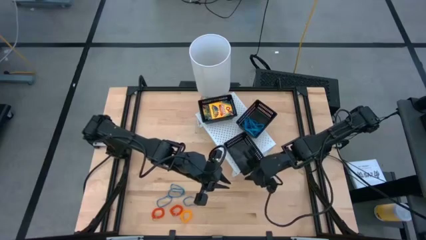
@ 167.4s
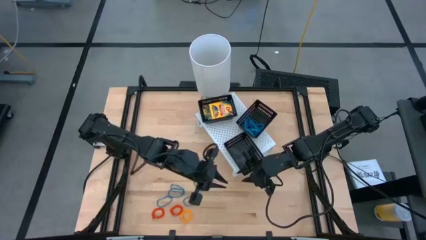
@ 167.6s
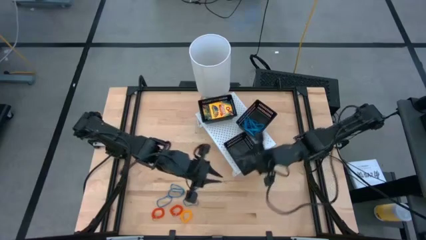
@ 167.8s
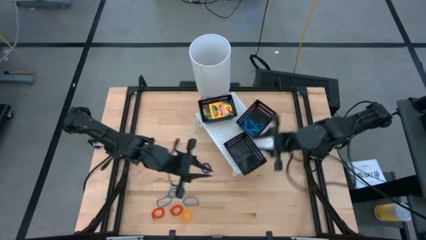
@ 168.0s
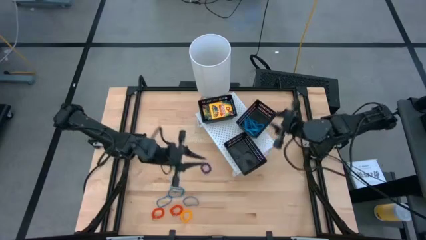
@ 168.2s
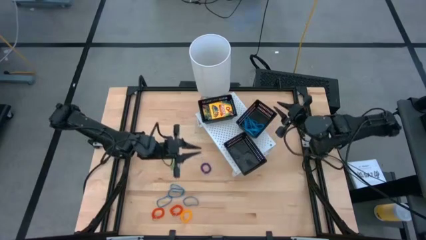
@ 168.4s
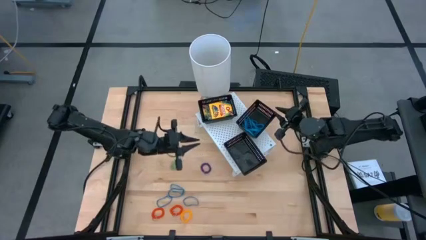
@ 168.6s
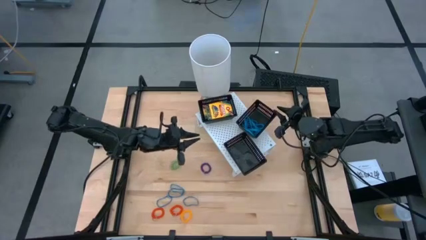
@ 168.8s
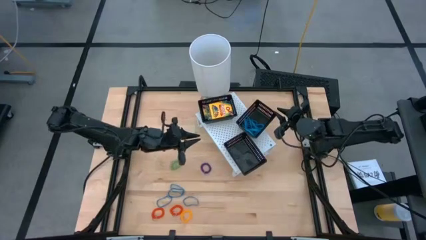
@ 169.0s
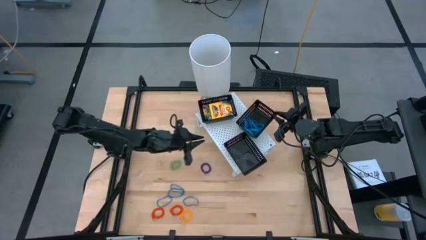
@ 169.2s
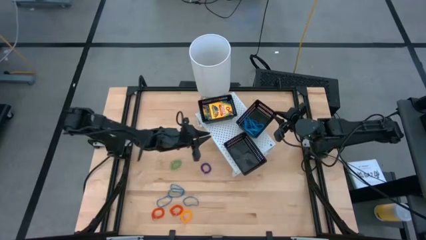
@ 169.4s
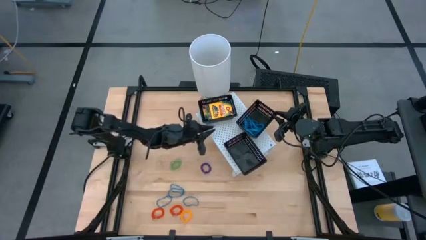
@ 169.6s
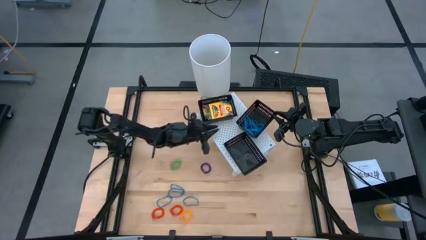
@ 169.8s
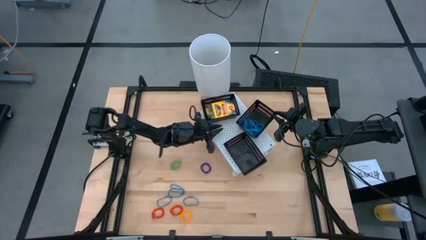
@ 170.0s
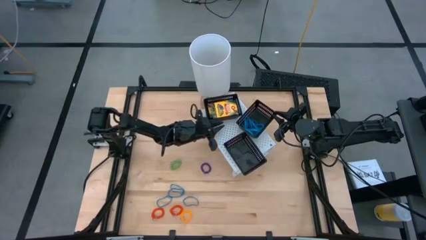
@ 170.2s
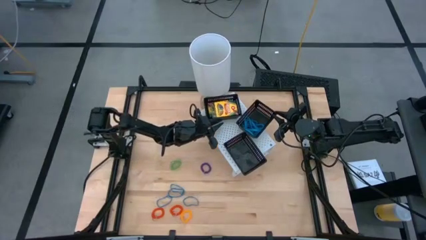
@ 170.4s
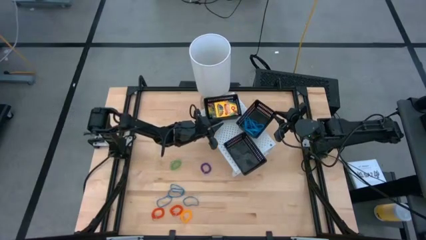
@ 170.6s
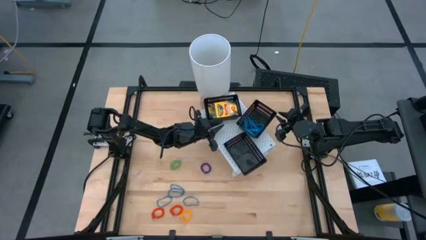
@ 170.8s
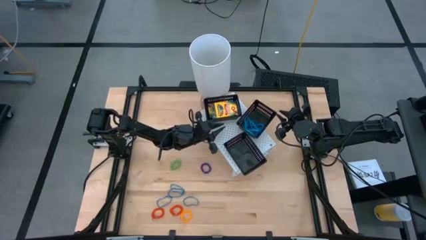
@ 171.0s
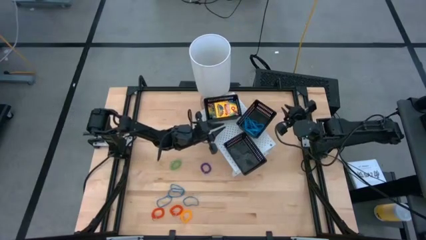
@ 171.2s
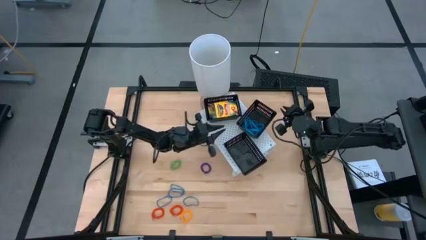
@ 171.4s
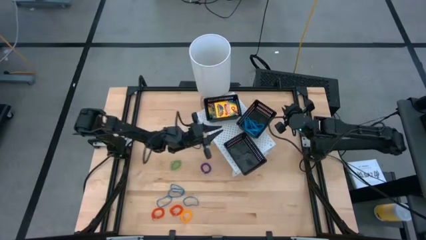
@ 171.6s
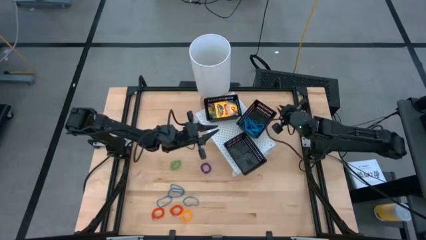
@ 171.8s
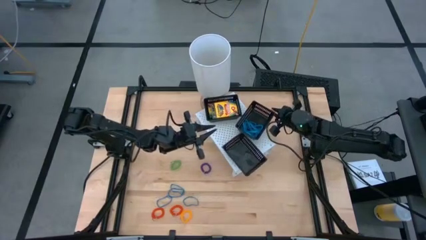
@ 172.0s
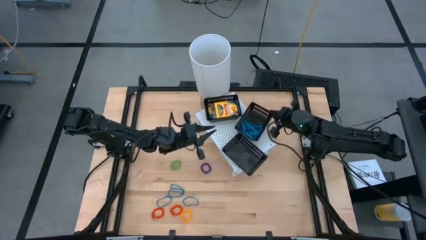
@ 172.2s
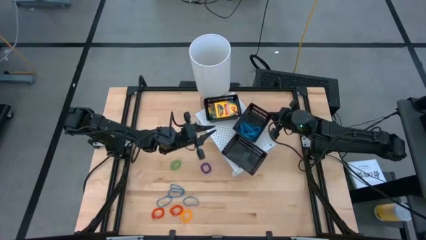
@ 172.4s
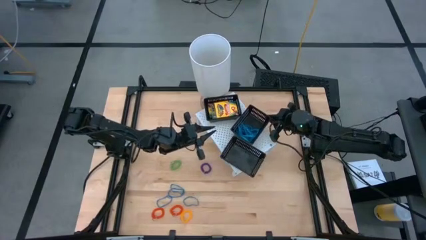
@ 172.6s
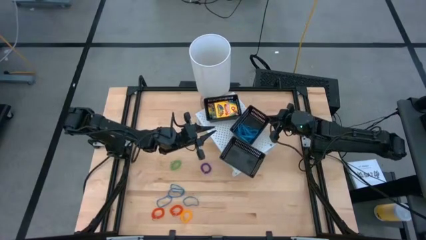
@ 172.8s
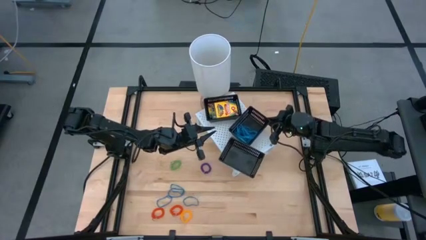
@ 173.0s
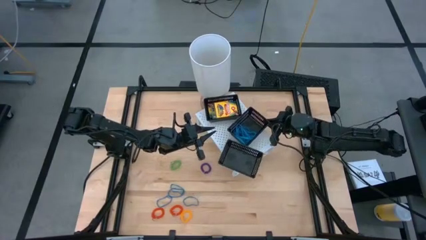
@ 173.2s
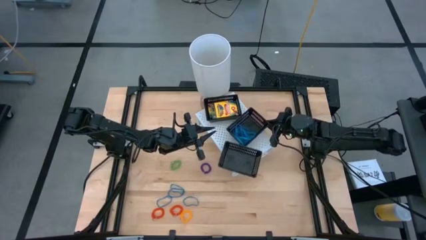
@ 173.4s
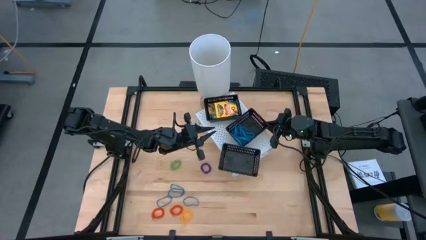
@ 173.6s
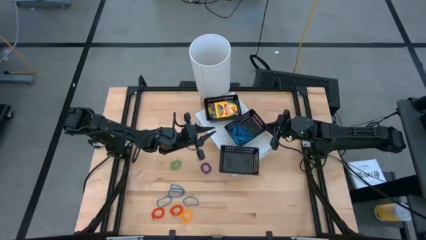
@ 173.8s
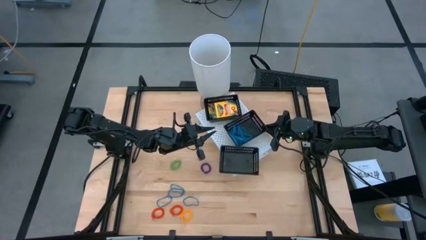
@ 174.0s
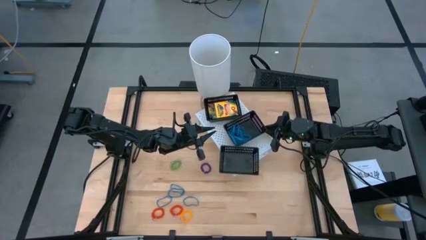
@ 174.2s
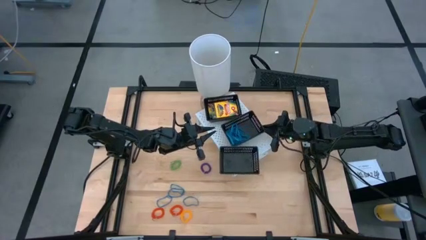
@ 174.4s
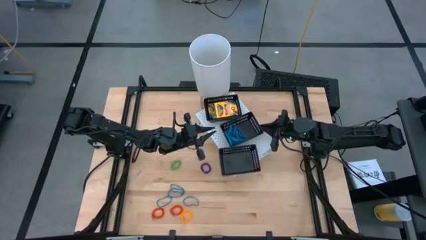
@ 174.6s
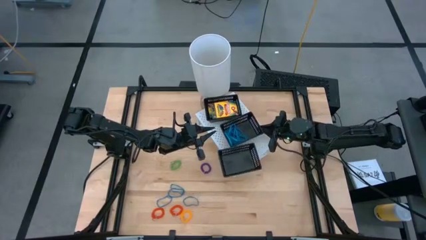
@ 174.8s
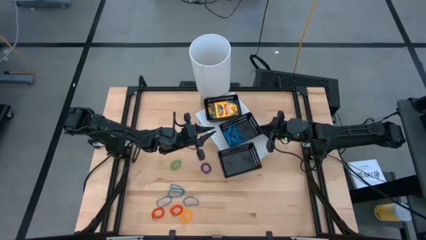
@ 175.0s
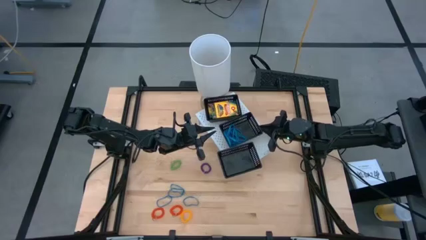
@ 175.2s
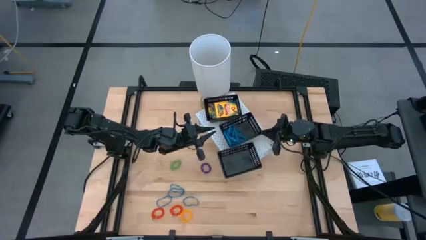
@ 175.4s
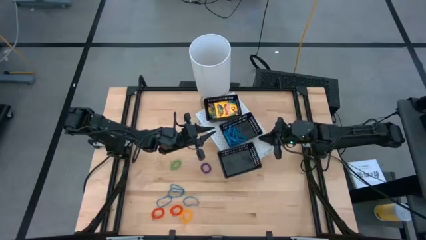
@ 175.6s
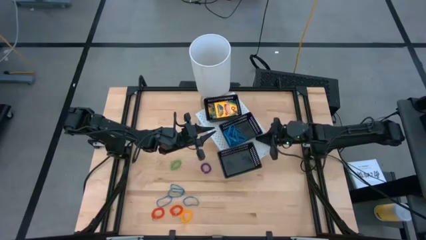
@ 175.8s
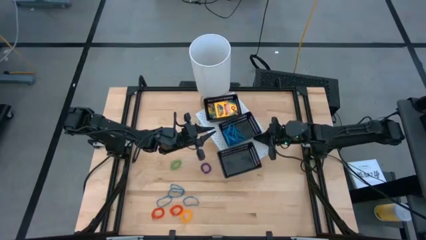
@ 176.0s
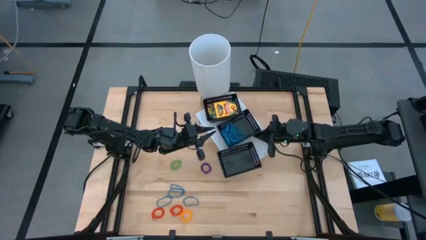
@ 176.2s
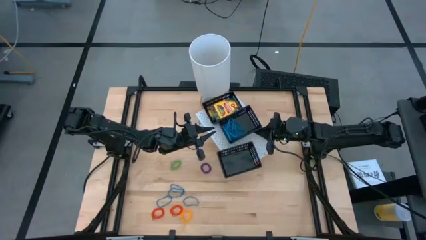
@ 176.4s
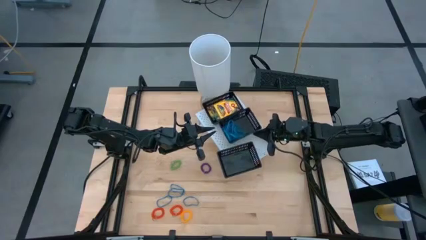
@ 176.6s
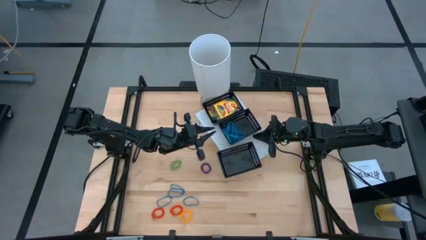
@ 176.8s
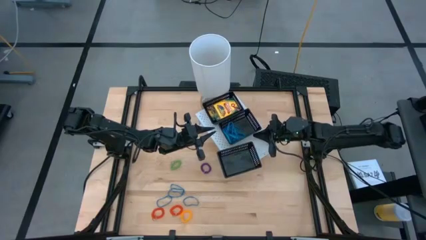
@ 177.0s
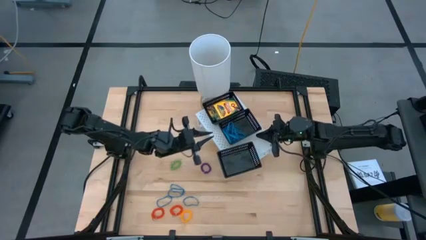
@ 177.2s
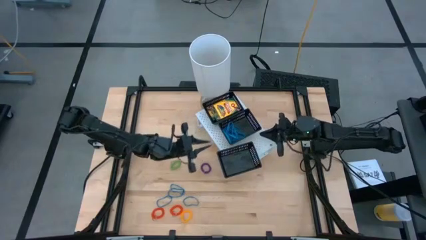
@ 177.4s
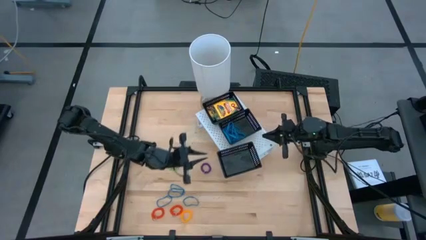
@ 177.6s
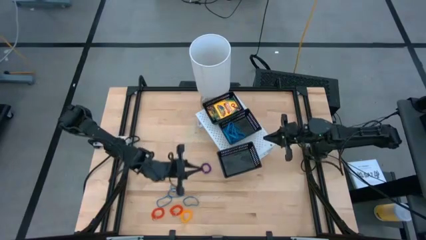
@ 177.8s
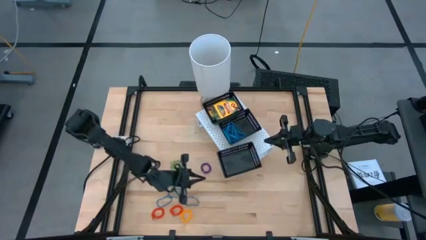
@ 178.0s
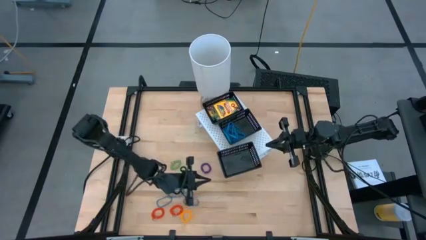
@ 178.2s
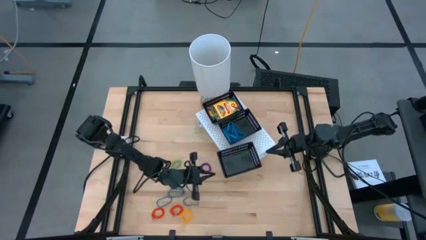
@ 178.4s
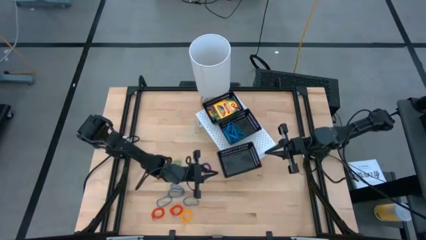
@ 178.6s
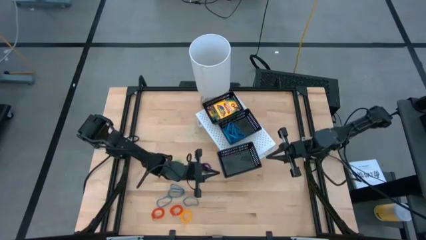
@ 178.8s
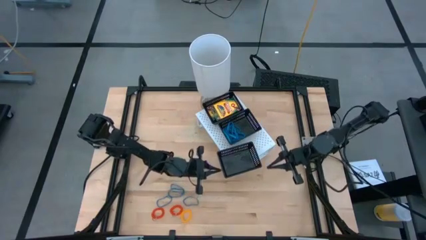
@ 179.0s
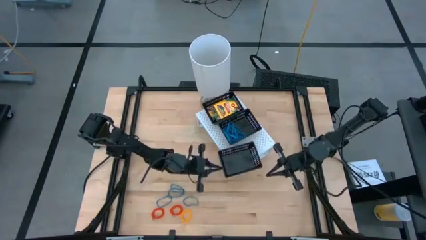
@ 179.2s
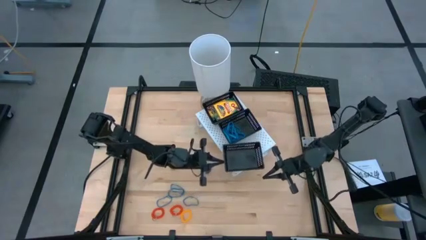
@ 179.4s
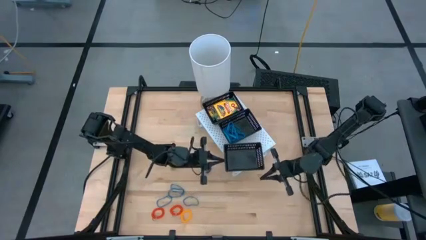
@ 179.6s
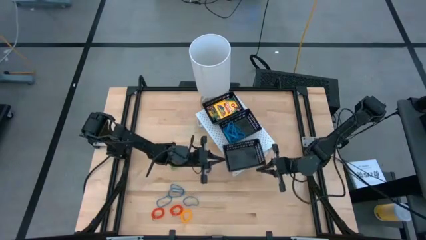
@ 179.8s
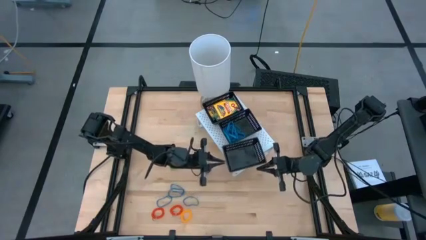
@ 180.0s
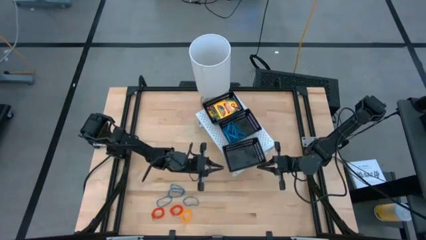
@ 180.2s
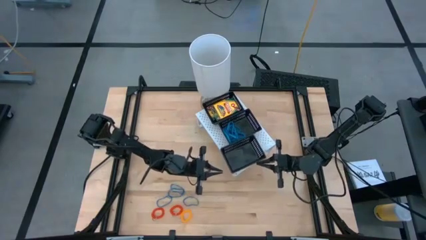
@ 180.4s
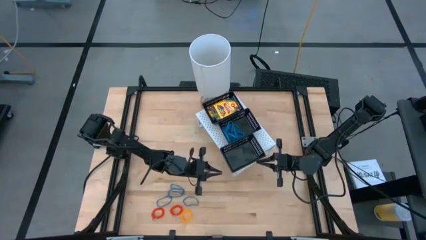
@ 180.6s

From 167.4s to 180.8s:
Task: Pick & Place Office Desk Supplies
Adjust the black bins on the shelf

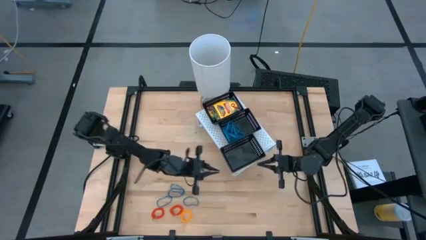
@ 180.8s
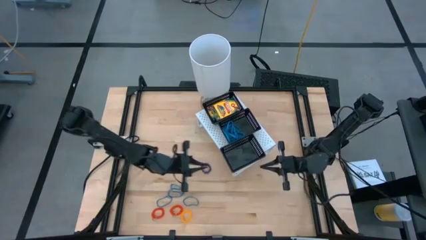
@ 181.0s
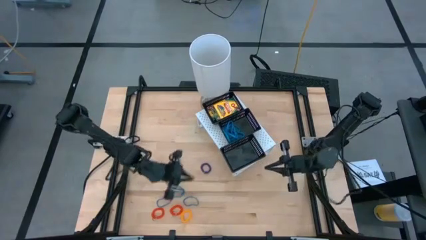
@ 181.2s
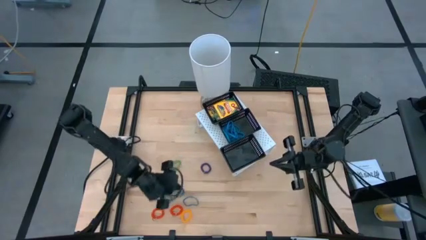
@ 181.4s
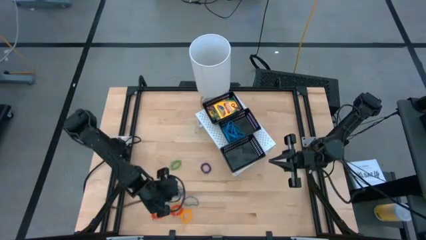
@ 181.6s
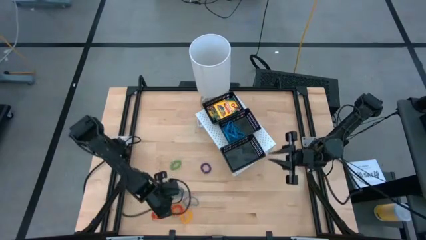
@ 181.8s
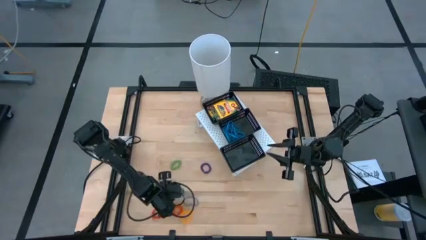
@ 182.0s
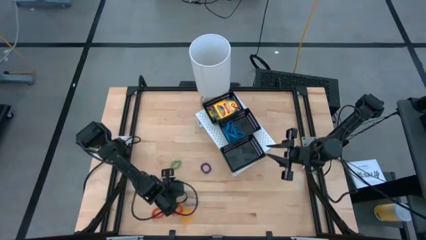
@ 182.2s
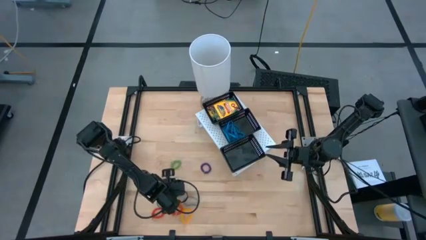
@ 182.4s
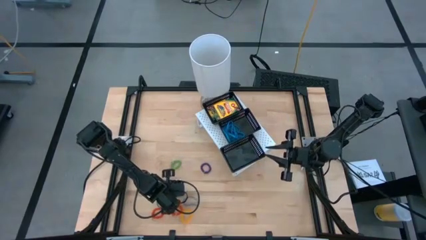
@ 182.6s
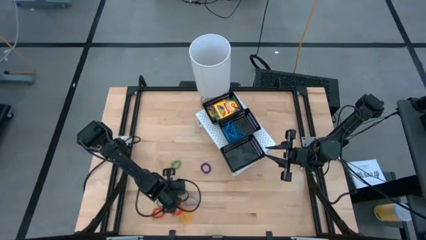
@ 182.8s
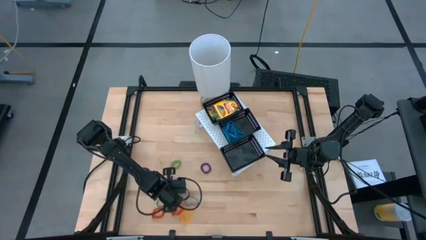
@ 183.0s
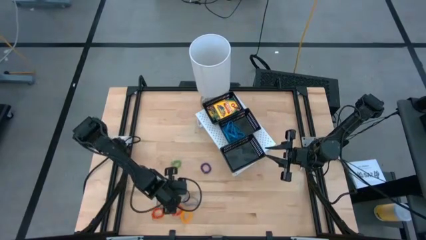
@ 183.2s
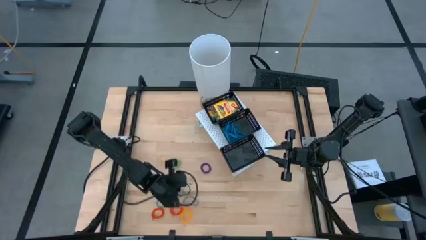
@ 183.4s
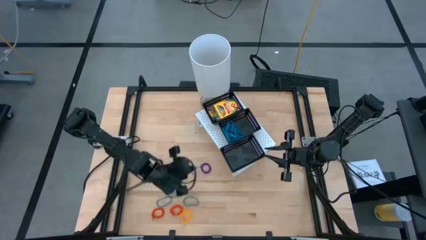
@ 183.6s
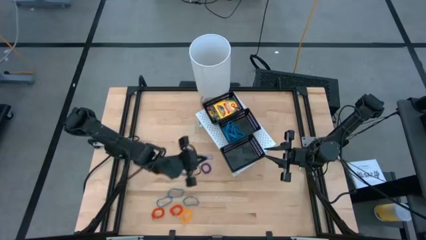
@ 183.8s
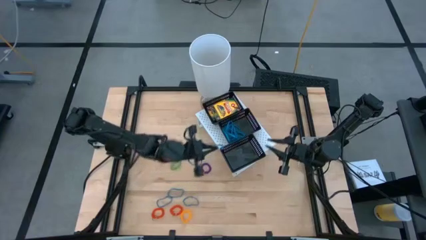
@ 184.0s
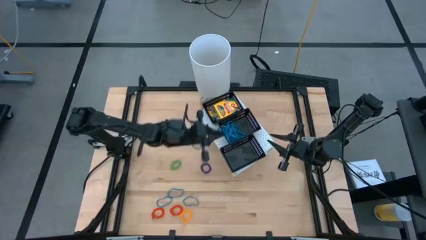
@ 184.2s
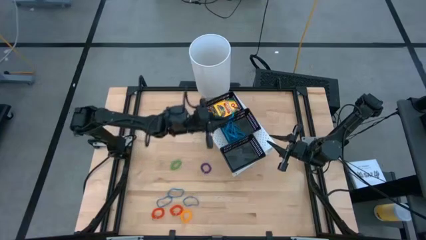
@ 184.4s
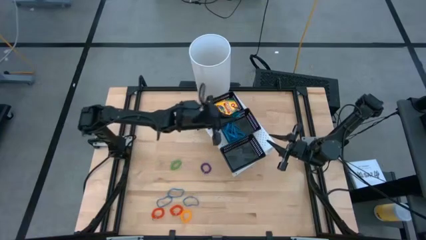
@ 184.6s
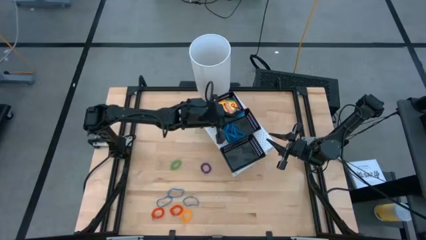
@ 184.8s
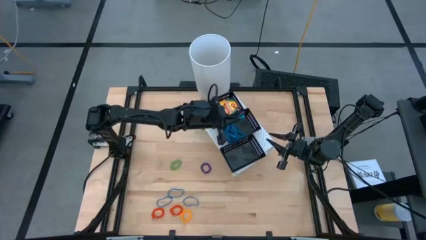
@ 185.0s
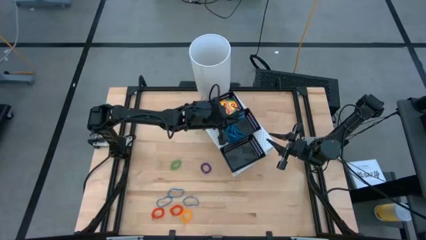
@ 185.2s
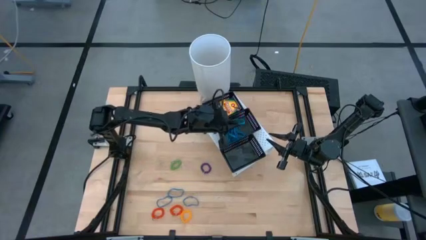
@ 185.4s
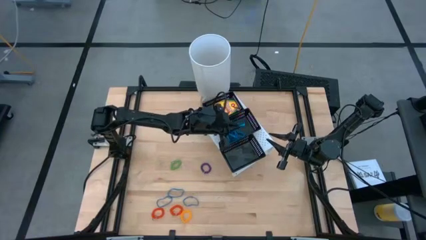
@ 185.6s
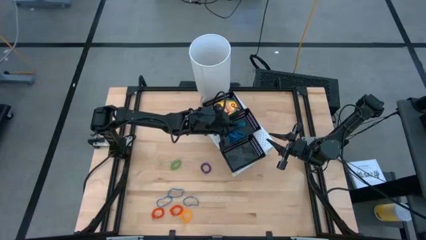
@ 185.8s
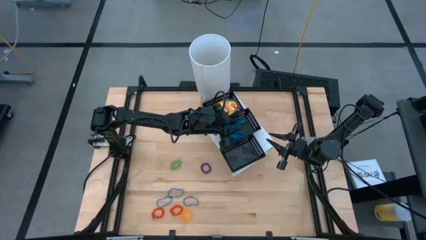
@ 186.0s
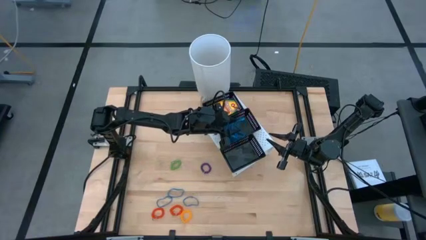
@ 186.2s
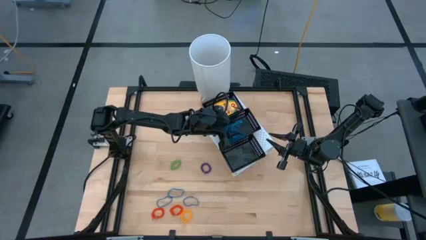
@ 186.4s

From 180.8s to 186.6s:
Put the blue rubber band into the middle black bin on the shelf
